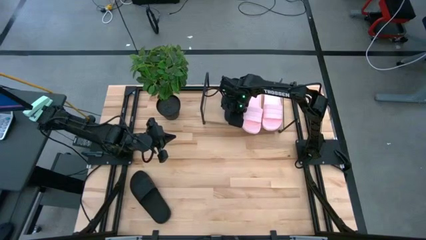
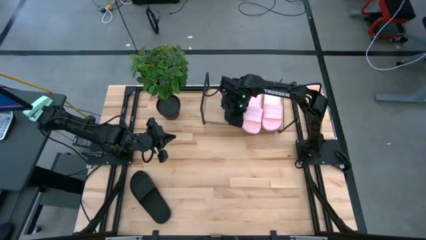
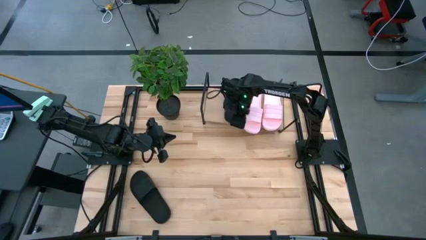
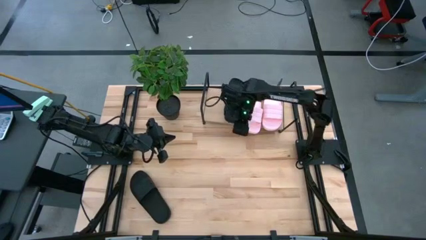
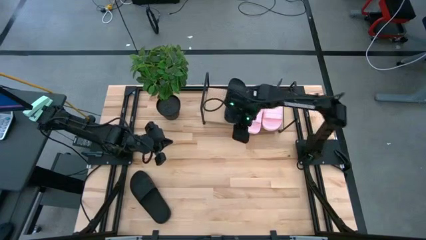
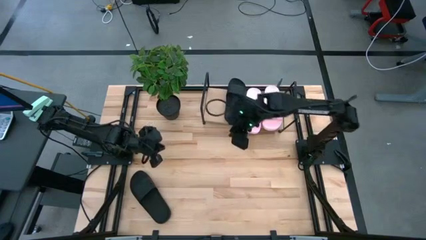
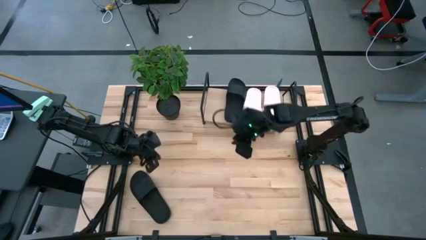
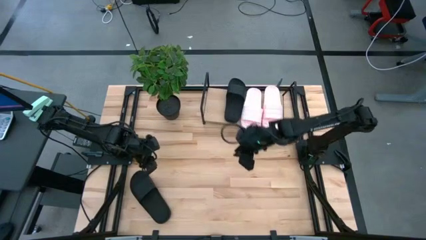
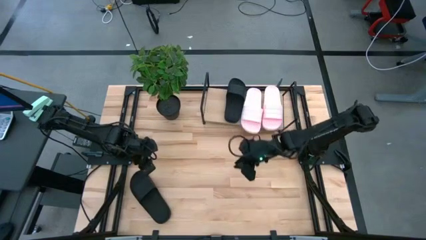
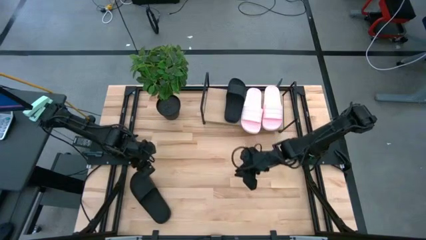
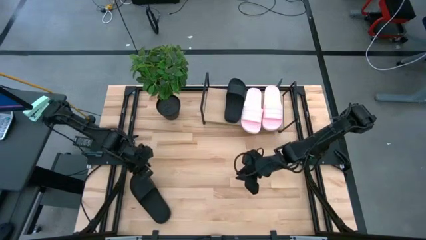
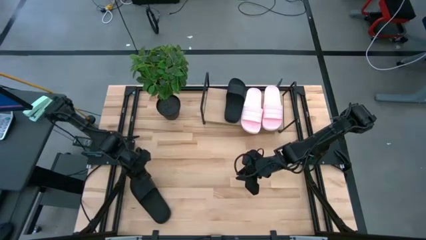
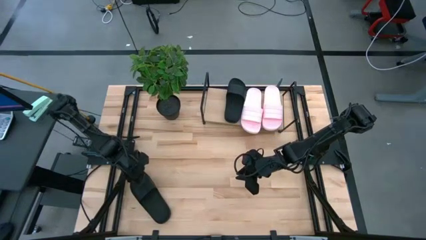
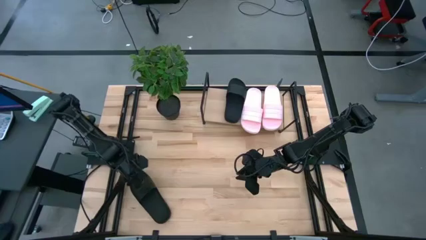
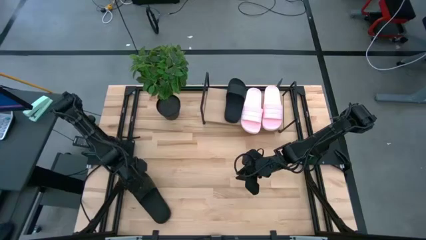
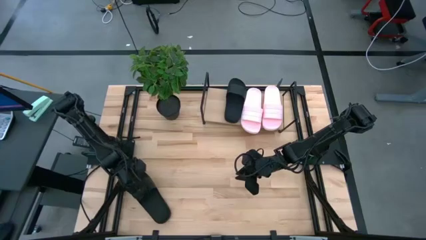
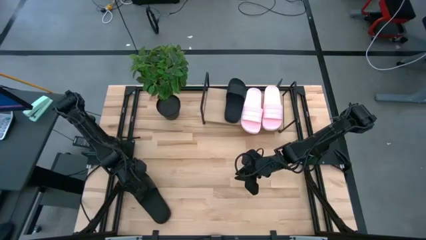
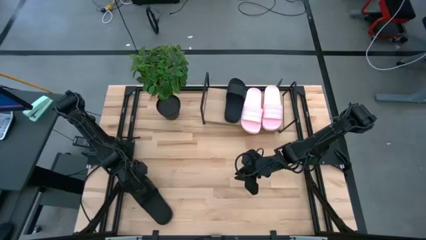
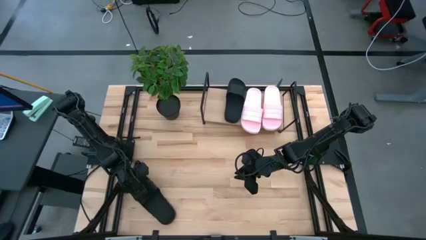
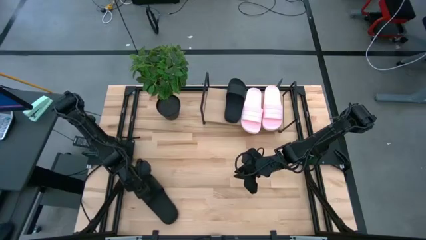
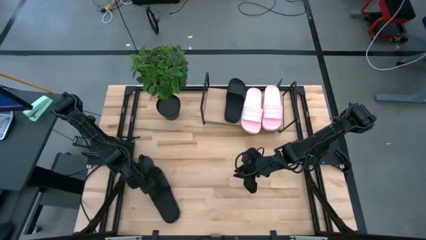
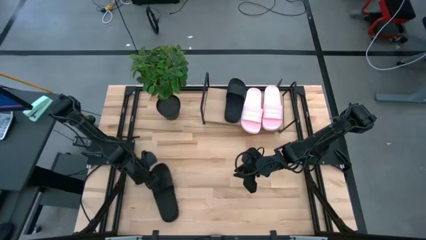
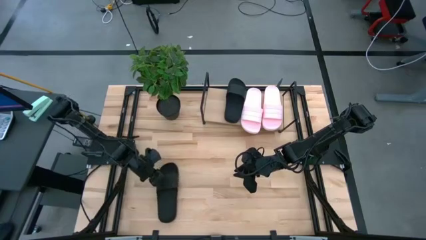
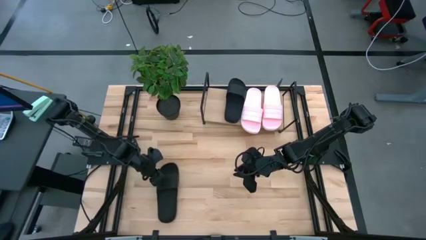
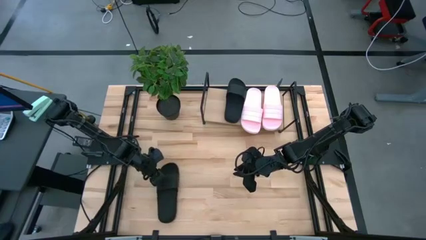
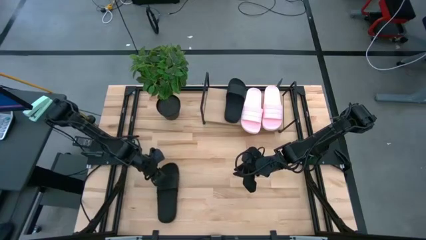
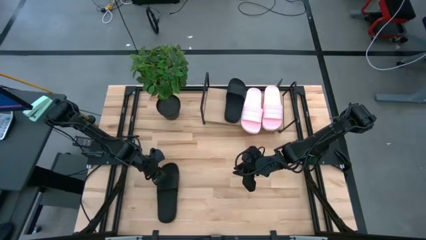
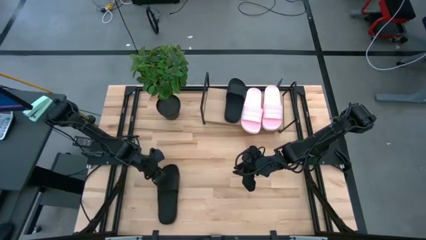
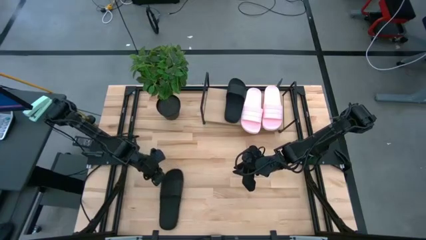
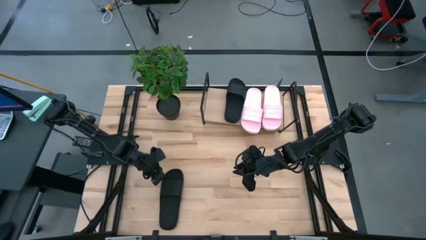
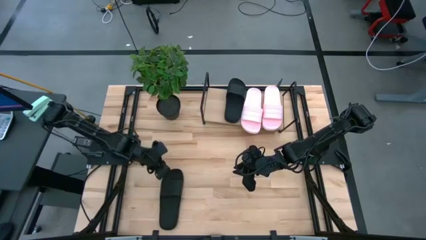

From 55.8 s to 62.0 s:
Task: Pick and place slides into the shelf
Put the black slide on the shelf

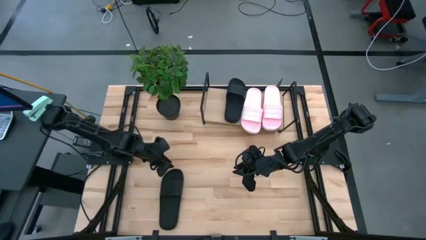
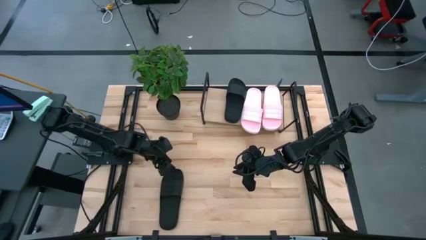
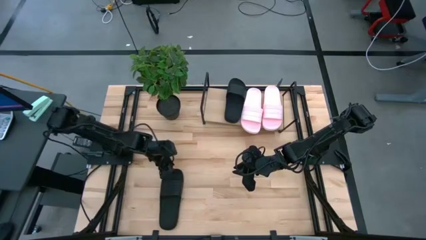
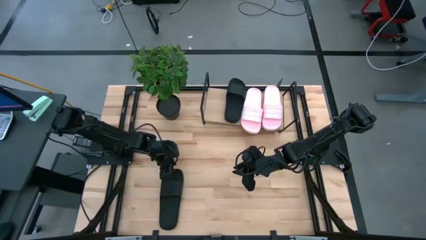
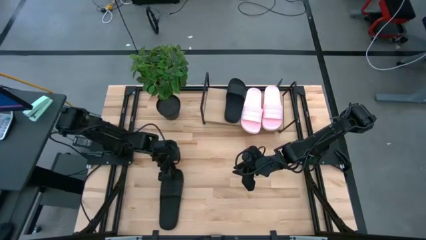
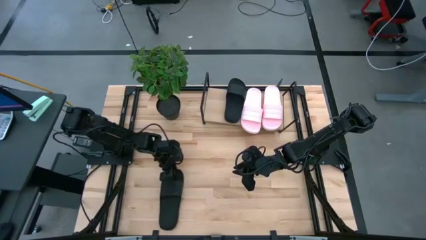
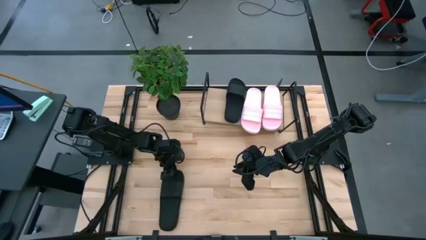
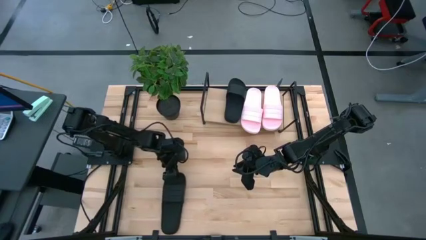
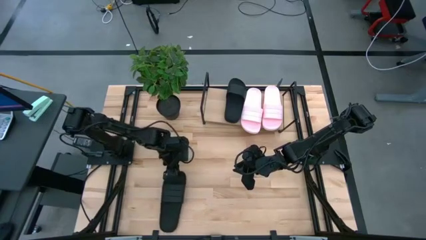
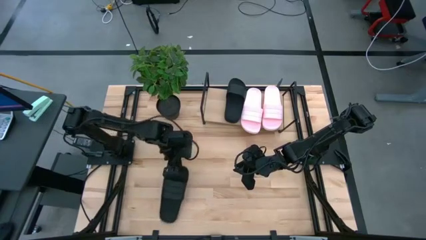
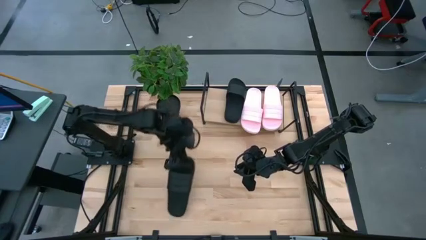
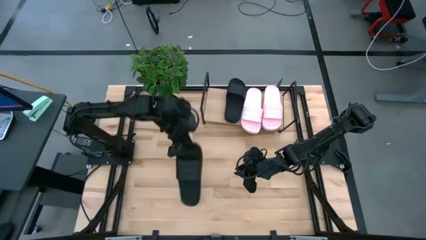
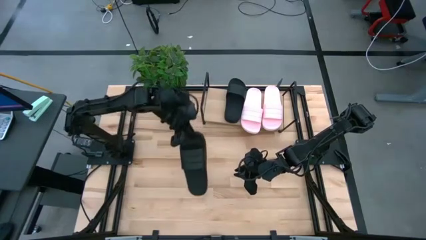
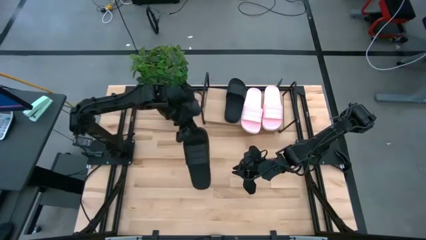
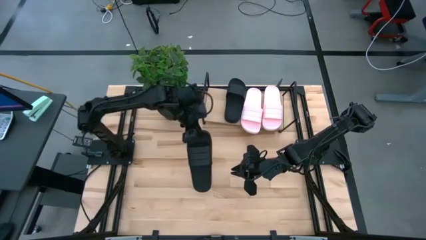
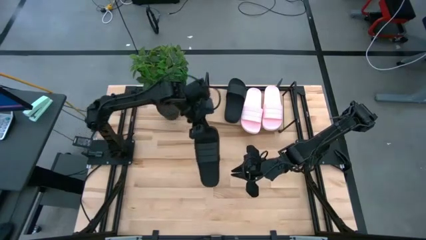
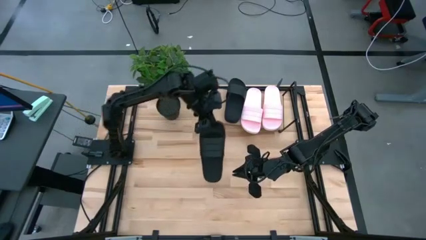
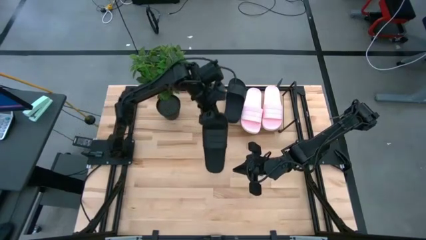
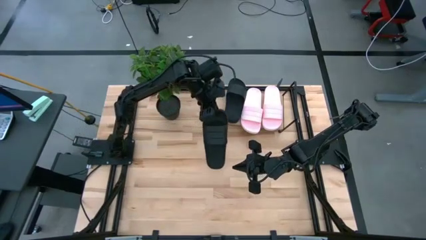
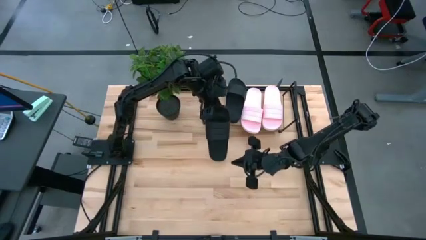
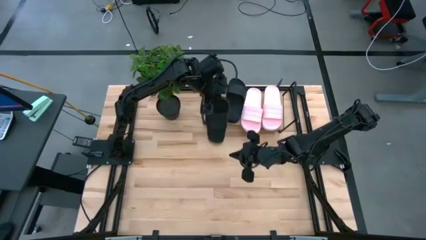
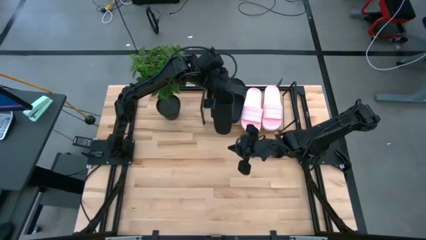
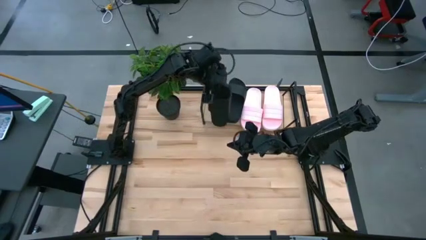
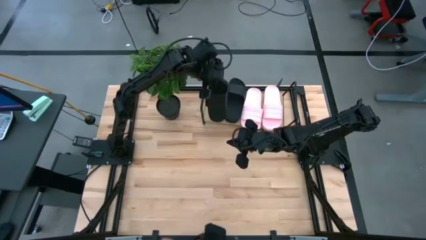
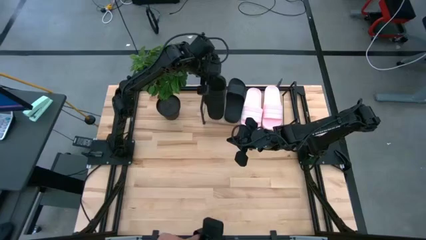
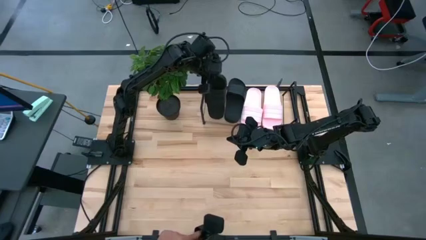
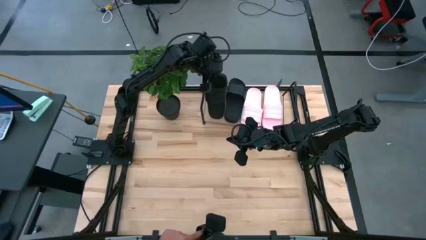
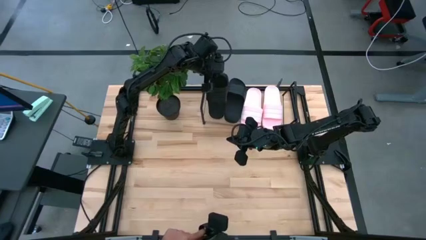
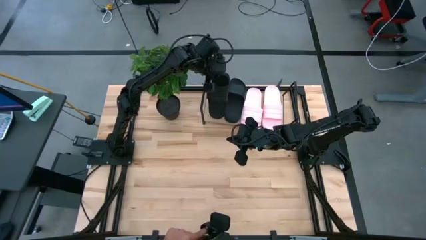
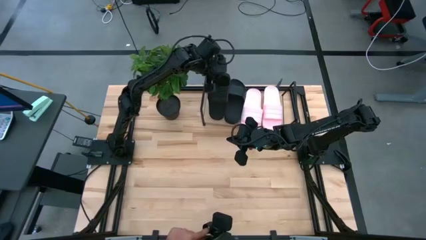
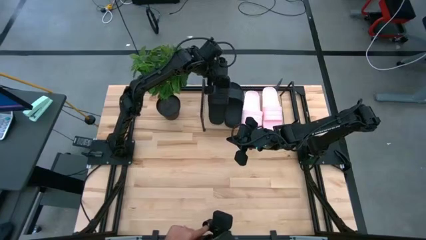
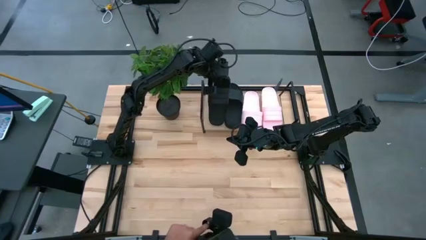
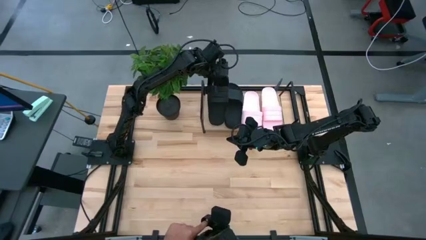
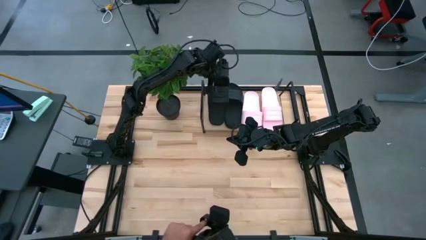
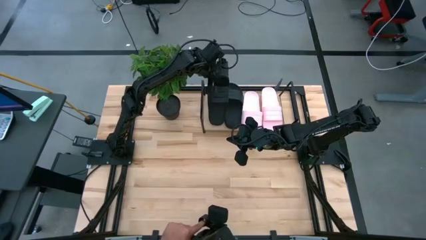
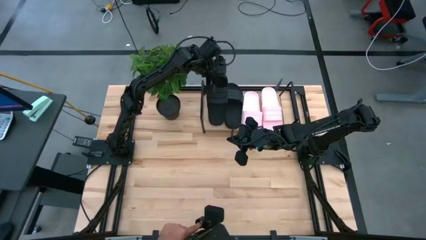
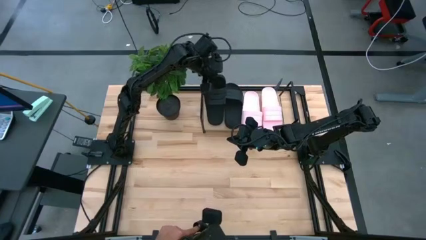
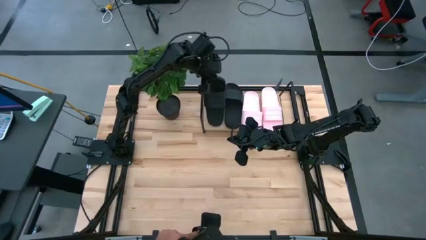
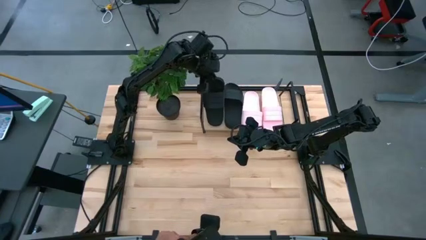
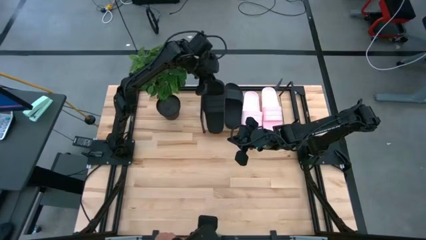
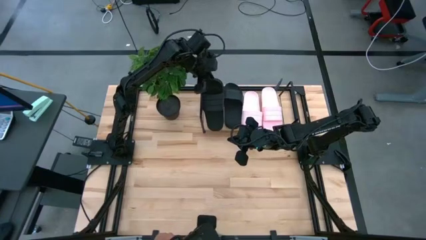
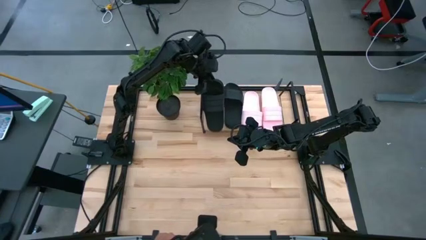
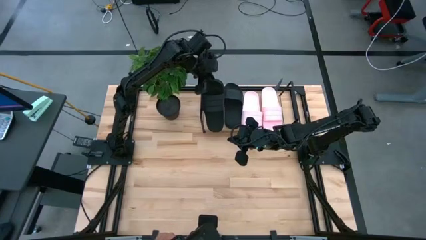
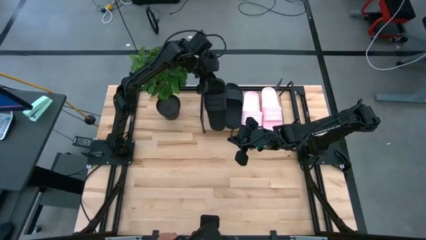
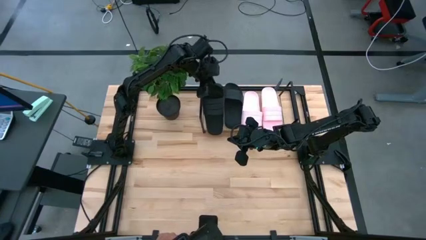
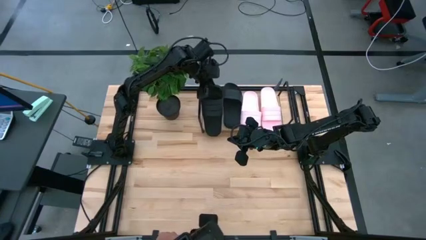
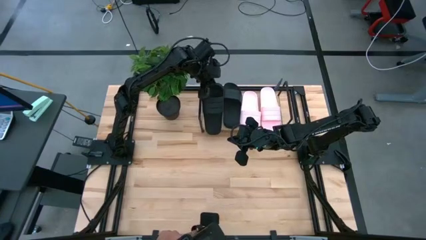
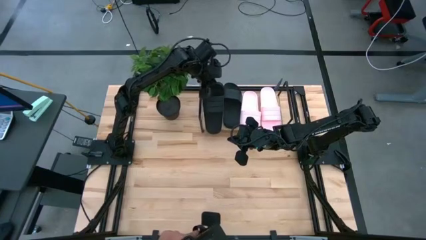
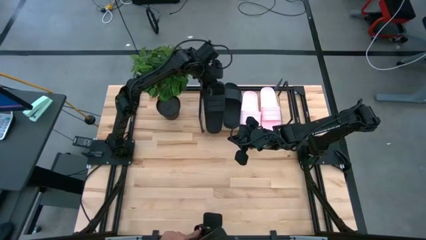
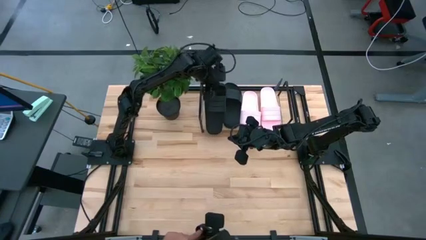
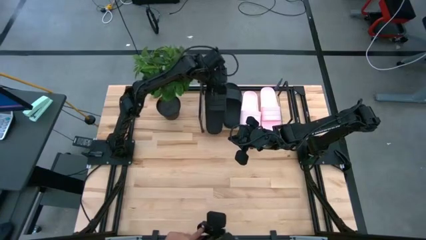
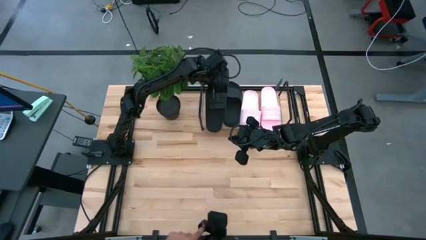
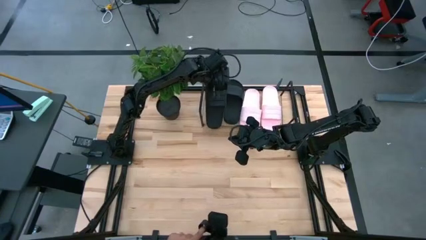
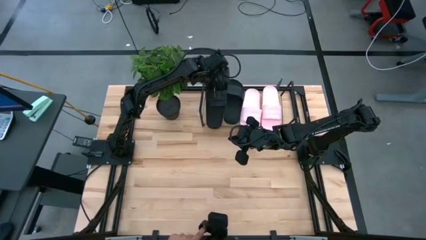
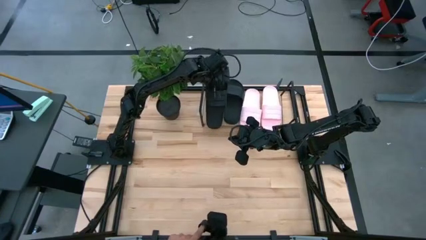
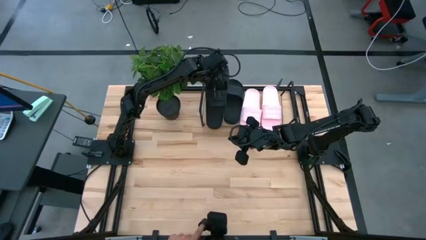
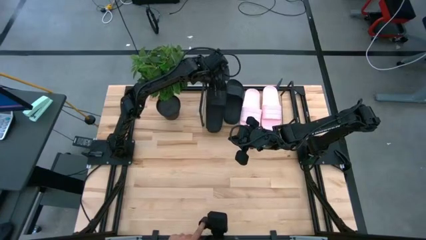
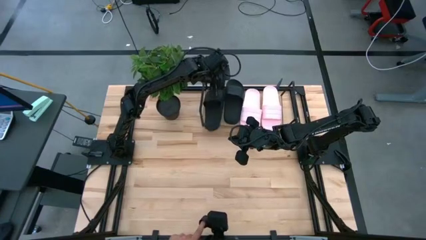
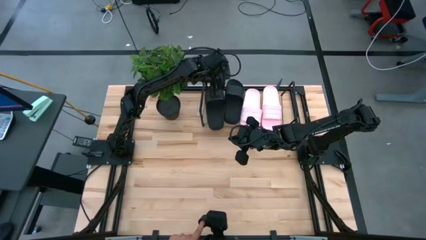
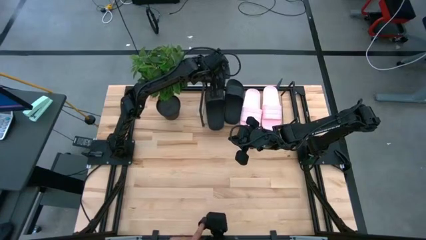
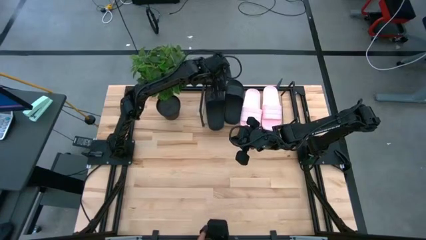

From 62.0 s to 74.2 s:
Put the black slide on the shelf
